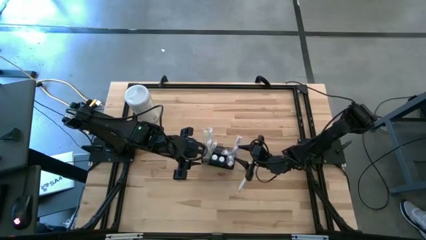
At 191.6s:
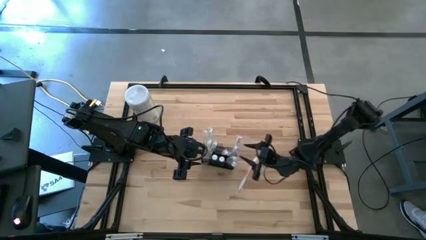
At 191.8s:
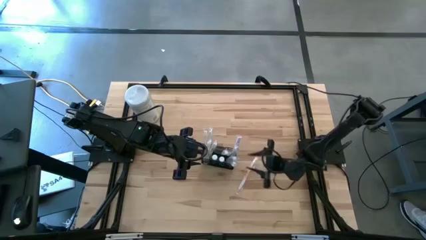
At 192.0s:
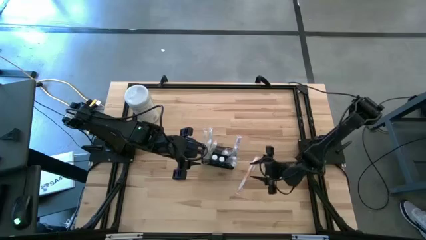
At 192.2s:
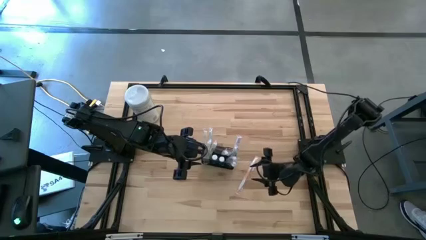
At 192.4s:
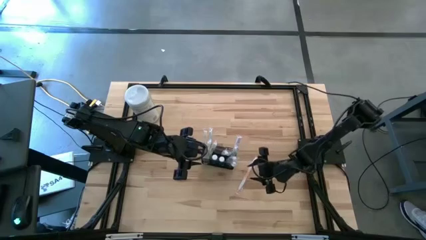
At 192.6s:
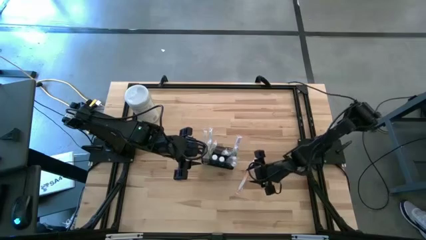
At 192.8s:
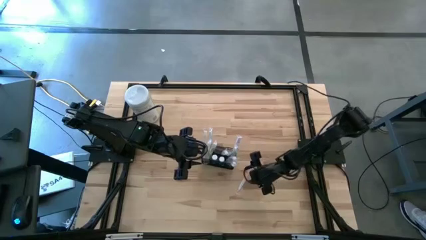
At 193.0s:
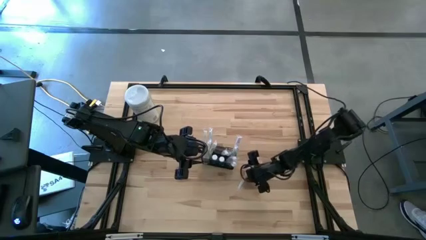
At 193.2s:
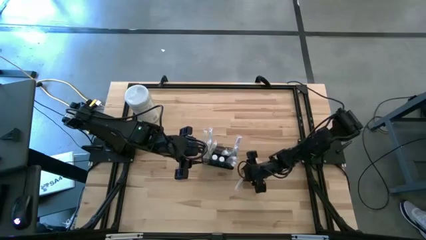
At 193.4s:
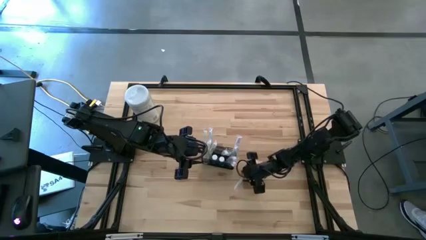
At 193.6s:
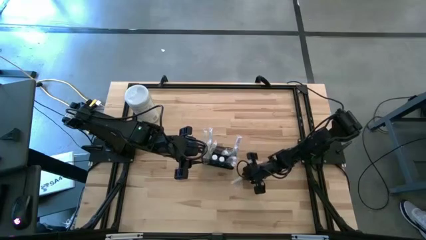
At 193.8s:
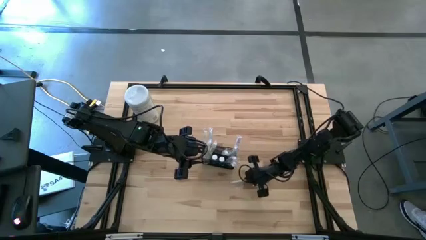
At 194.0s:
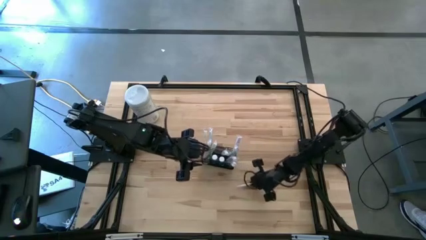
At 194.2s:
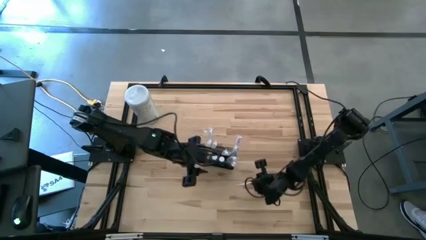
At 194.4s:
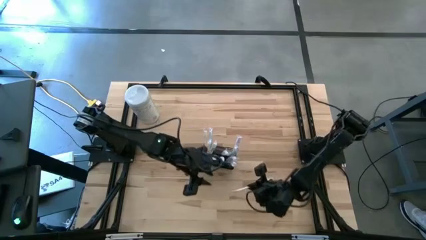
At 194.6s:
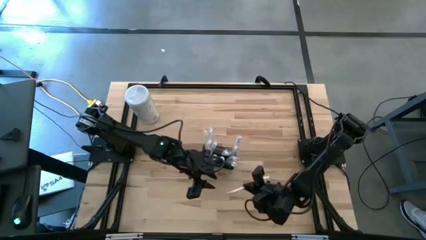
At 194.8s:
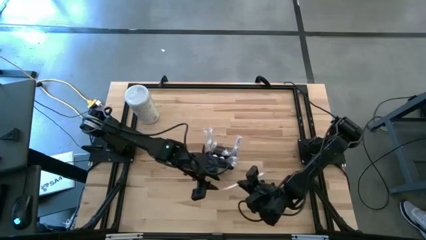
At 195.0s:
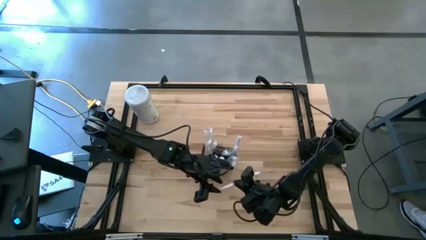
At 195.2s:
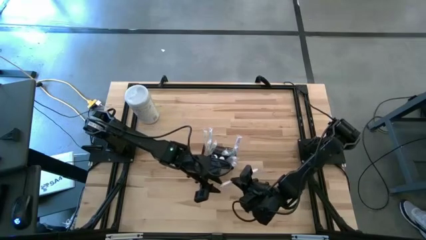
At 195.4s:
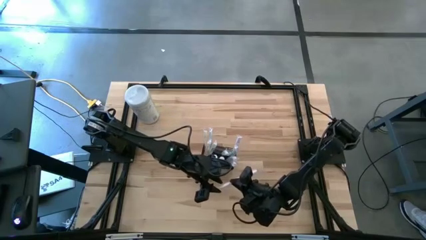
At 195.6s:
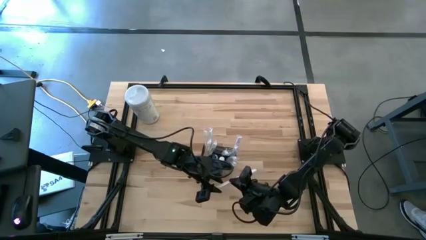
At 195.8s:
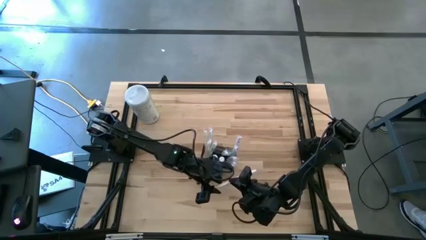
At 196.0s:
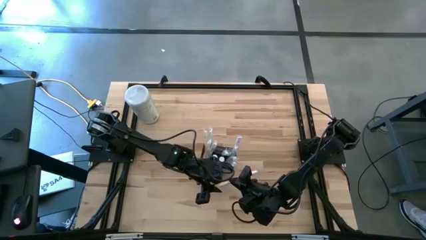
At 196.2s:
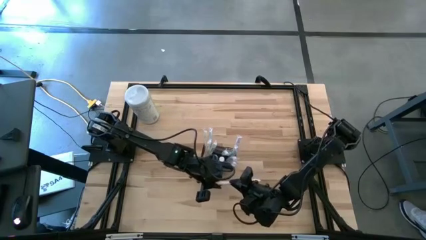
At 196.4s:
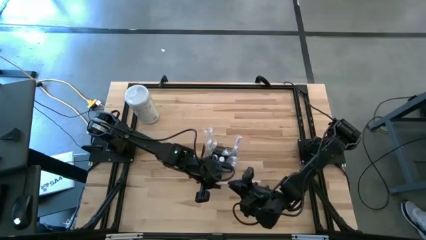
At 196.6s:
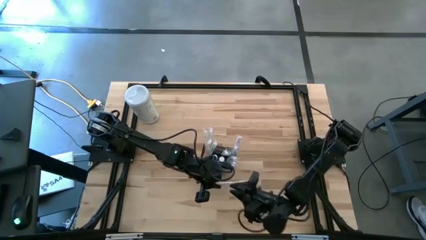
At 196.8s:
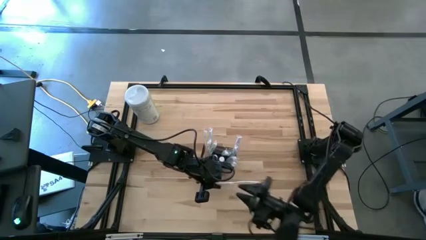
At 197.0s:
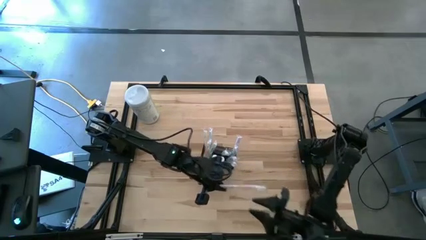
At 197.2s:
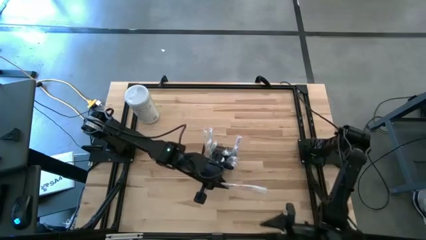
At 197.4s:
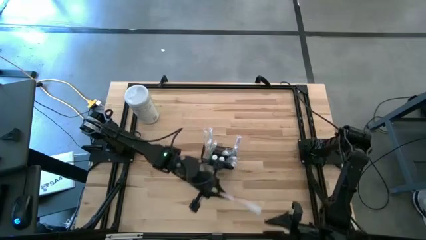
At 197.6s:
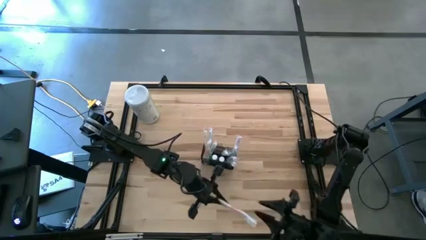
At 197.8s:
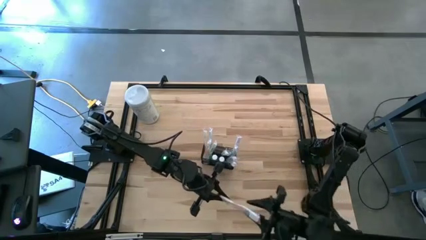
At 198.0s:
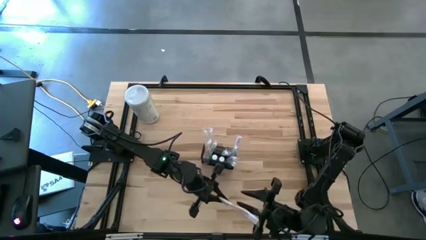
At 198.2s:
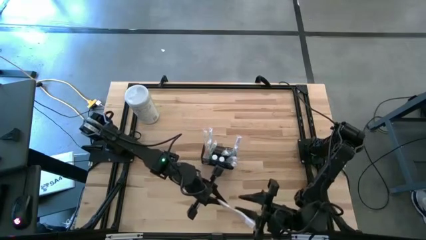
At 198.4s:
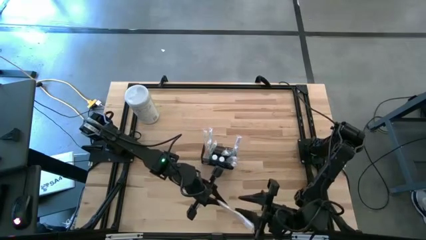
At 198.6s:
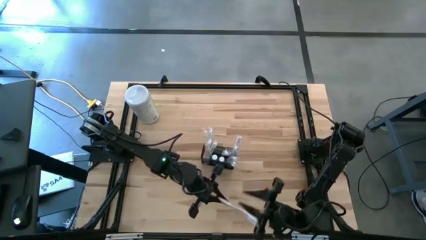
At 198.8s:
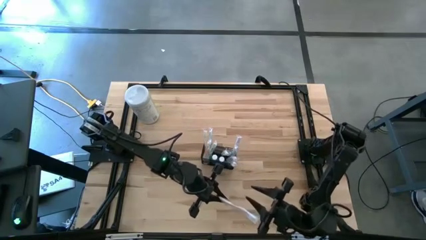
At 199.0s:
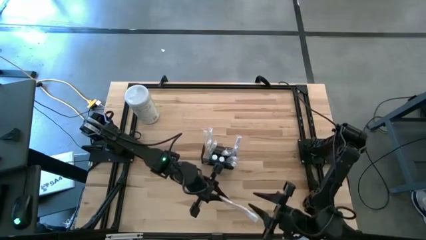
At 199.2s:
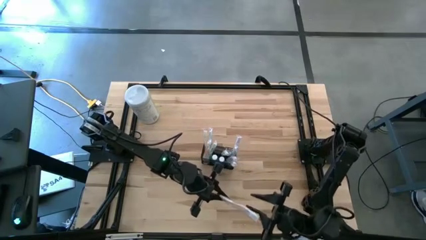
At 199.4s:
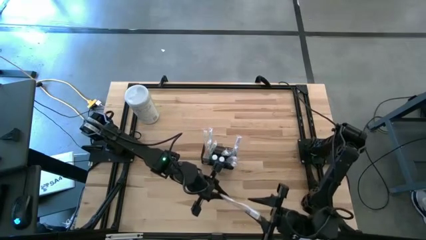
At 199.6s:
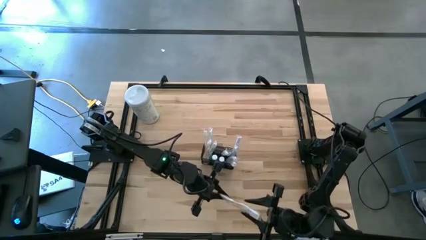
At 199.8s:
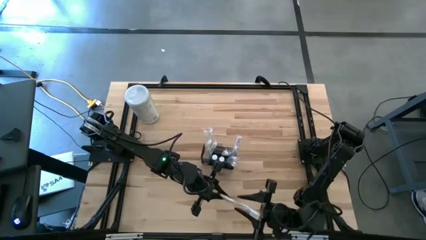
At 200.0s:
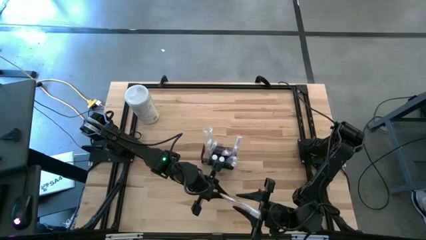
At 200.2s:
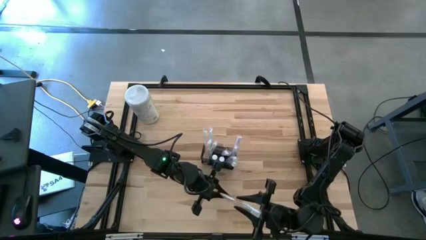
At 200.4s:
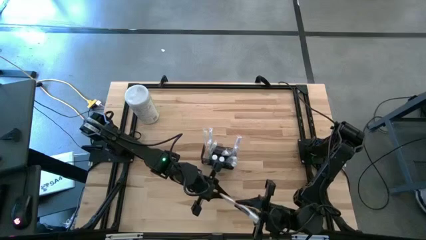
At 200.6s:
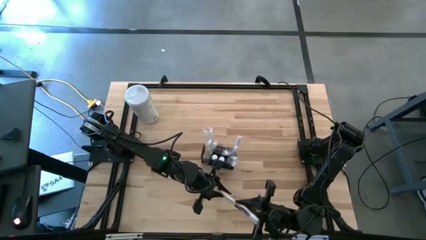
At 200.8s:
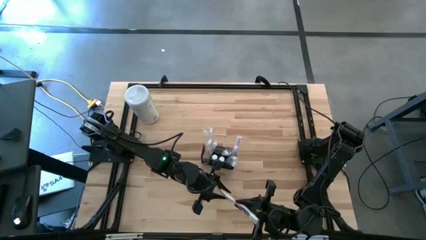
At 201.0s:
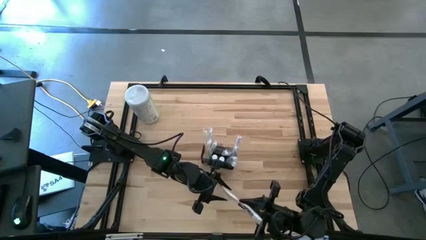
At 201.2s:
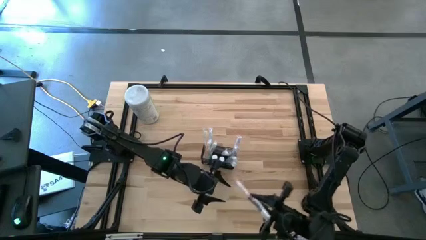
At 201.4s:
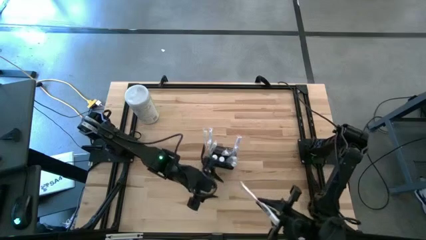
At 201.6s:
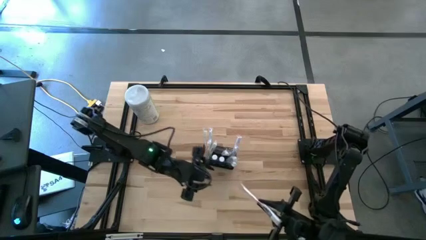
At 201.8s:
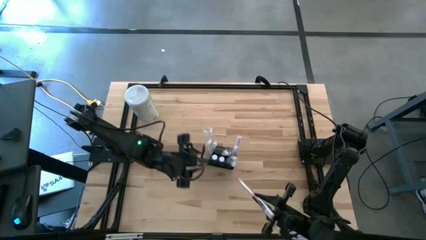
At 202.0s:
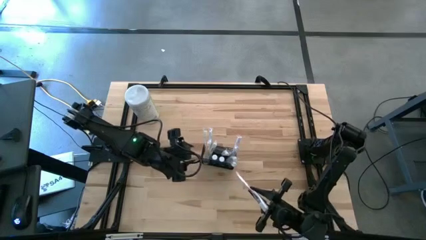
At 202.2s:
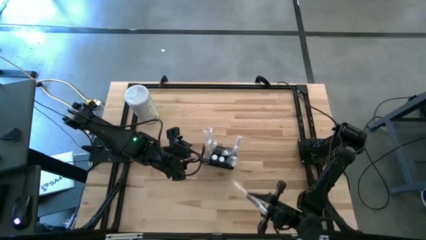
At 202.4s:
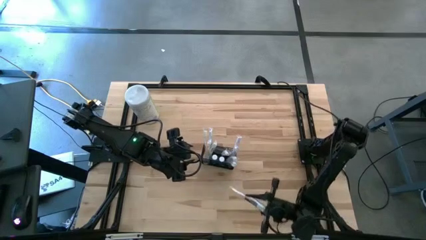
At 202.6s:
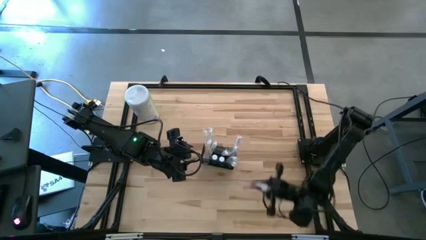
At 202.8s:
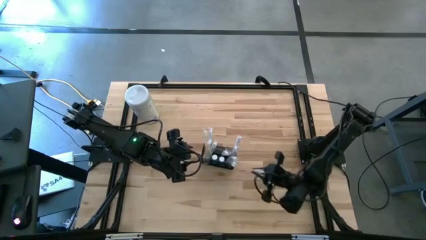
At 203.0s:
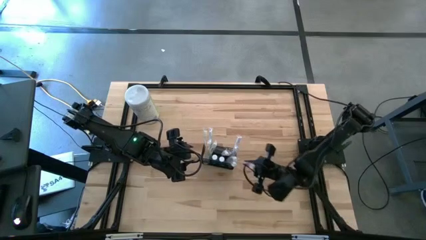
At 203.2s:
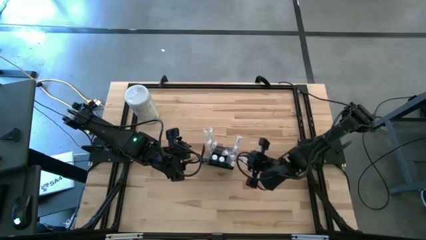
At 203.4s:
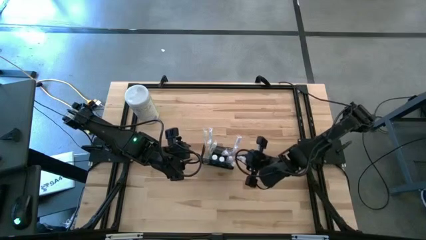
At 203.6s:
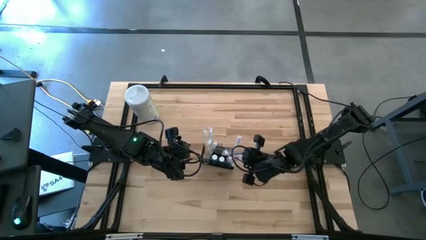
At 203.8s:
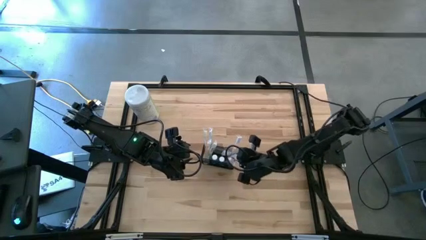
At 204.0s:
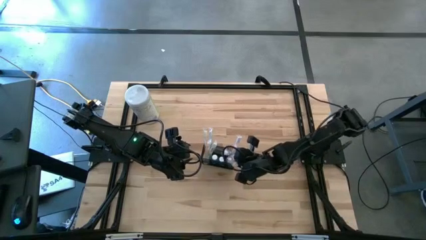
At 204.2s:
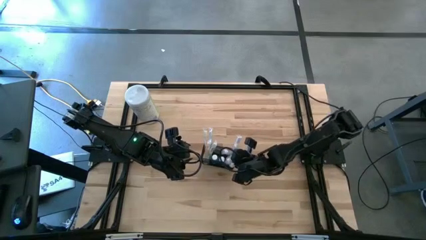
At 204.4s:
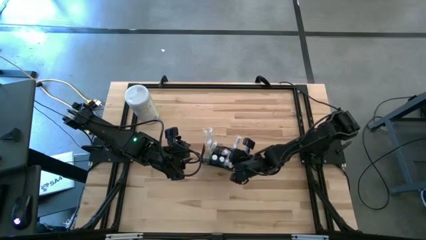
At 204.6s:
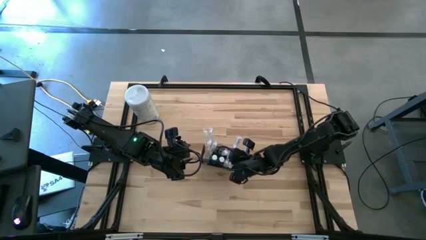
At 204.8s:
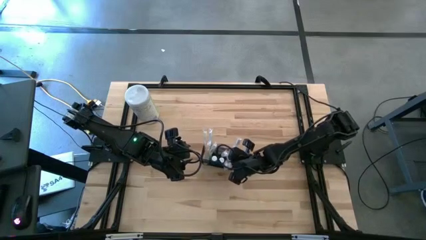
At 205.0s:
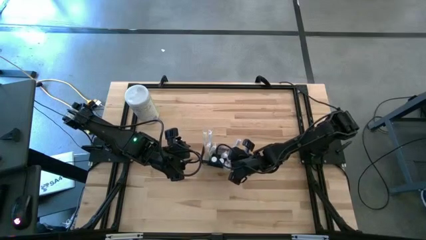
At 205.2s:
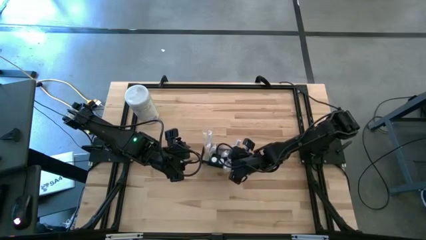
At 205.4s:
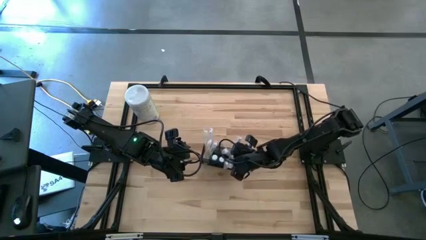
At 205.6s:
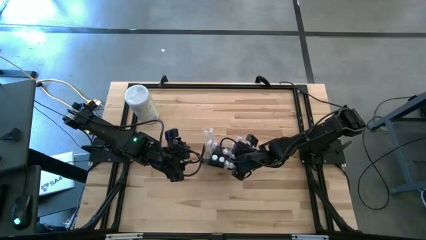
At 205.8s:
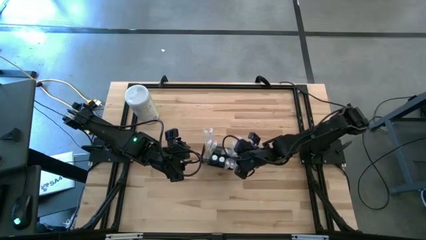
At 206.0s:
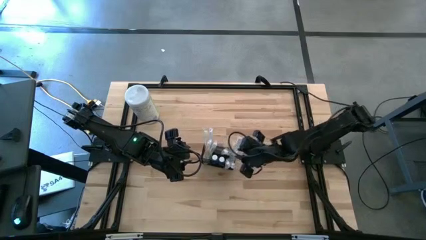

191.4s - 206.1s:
Task: Pick & Place toothbrushing station
Put the orange toothbrush into the mesh organizer
